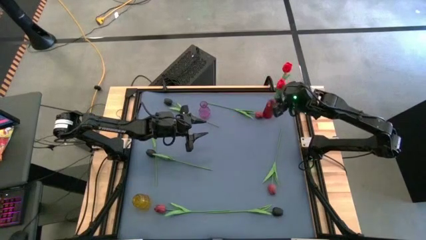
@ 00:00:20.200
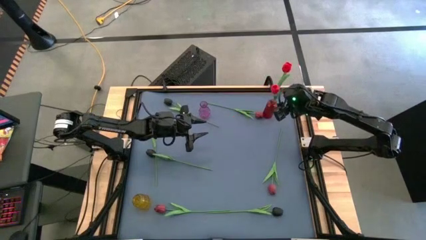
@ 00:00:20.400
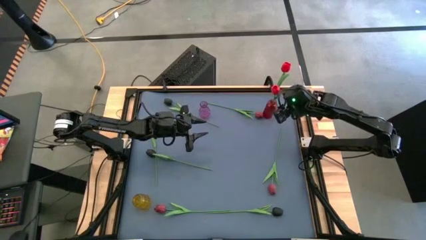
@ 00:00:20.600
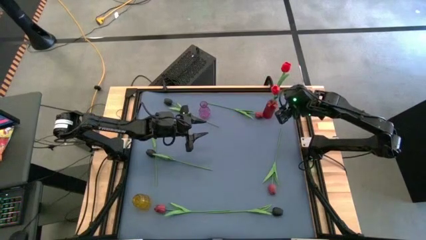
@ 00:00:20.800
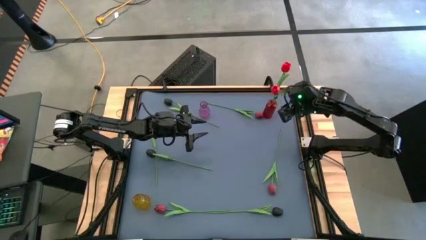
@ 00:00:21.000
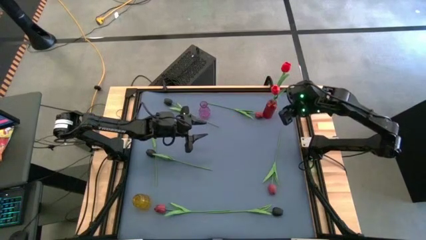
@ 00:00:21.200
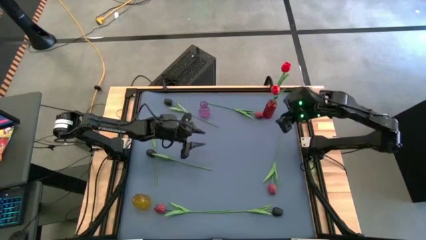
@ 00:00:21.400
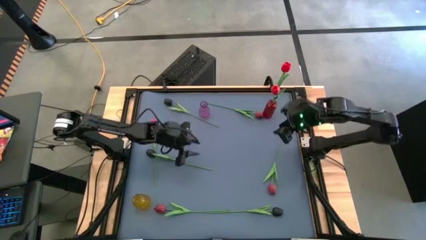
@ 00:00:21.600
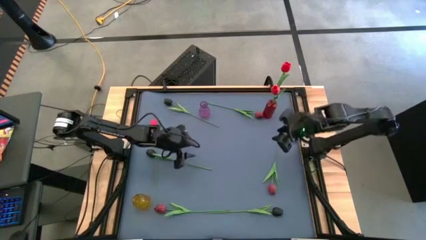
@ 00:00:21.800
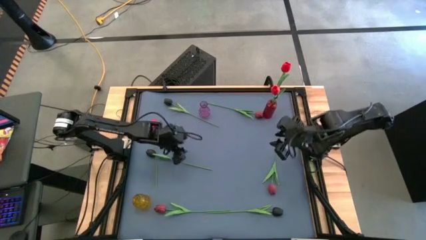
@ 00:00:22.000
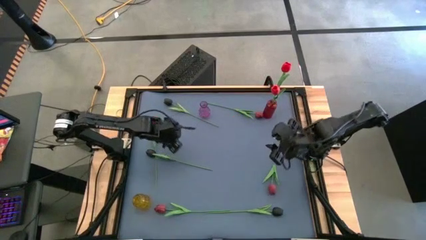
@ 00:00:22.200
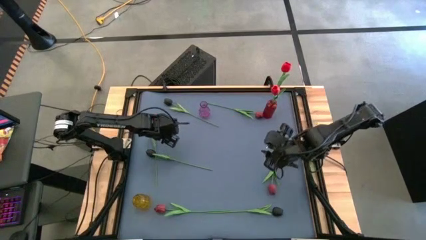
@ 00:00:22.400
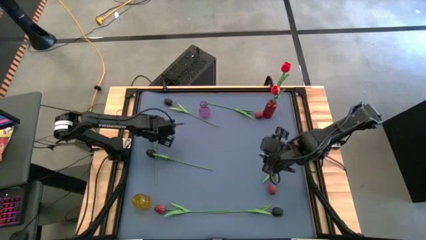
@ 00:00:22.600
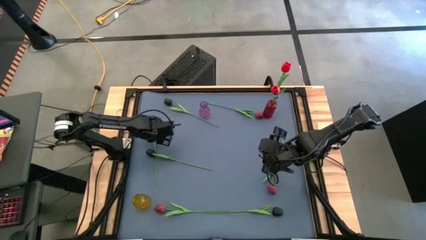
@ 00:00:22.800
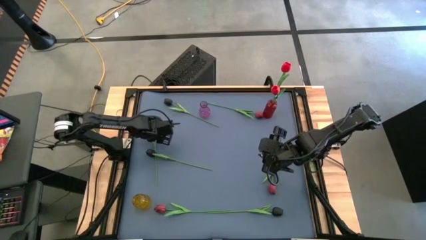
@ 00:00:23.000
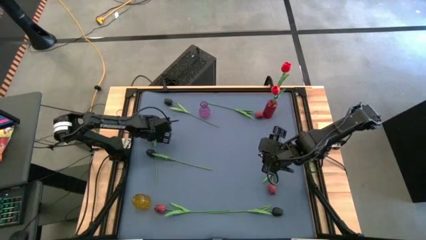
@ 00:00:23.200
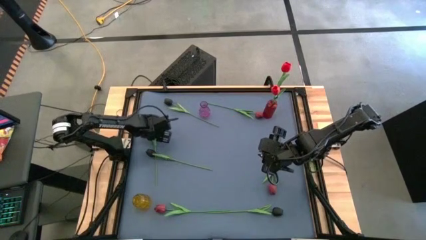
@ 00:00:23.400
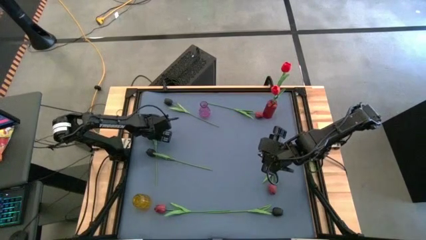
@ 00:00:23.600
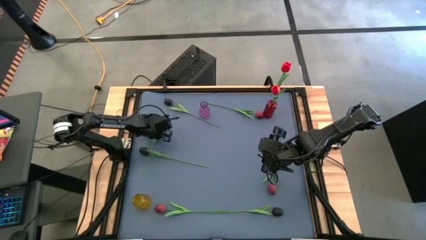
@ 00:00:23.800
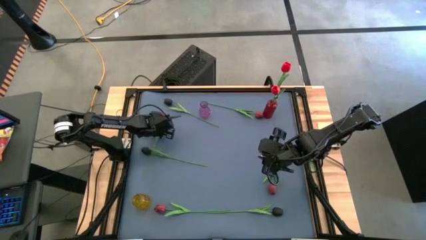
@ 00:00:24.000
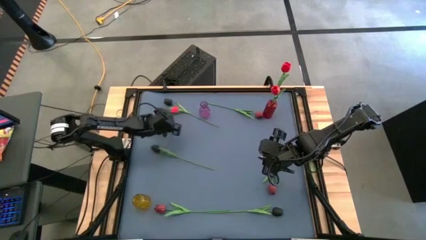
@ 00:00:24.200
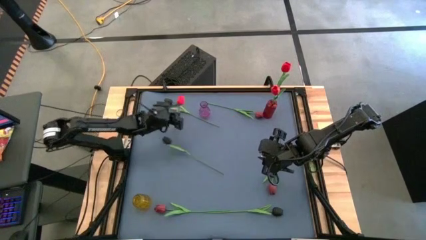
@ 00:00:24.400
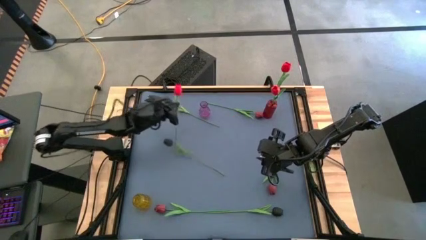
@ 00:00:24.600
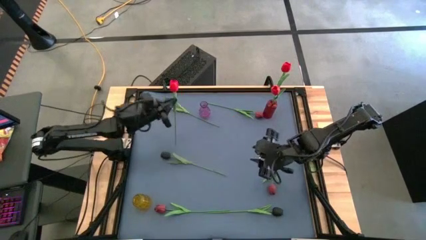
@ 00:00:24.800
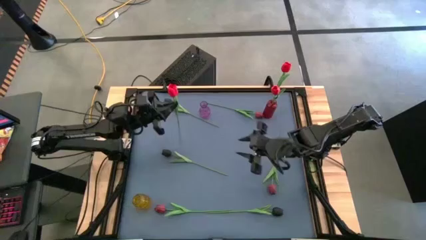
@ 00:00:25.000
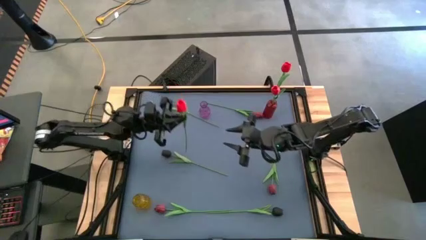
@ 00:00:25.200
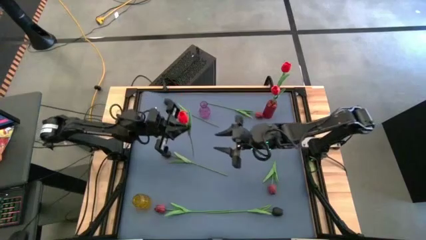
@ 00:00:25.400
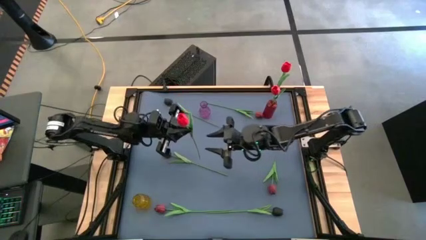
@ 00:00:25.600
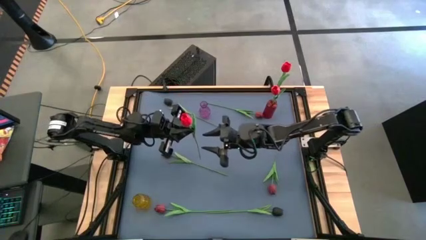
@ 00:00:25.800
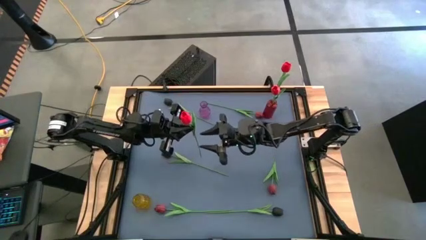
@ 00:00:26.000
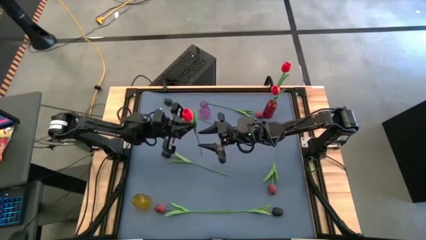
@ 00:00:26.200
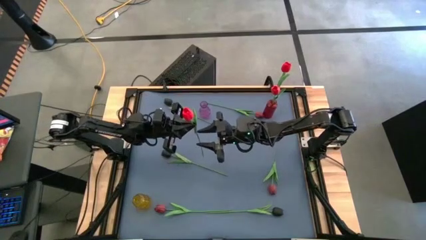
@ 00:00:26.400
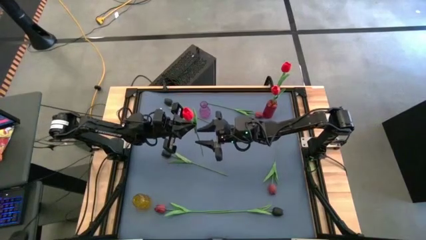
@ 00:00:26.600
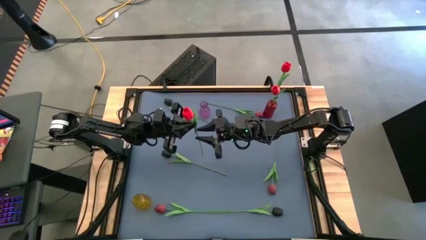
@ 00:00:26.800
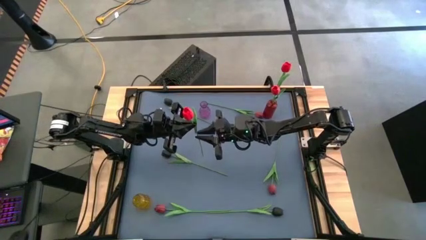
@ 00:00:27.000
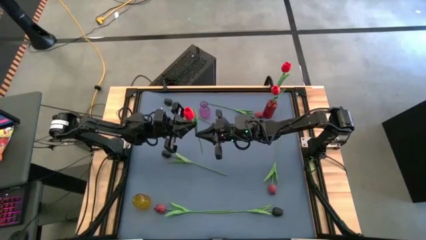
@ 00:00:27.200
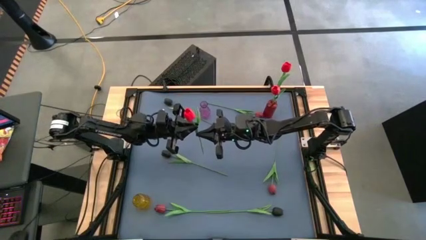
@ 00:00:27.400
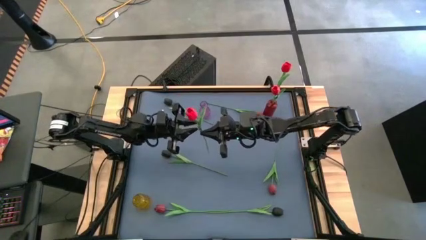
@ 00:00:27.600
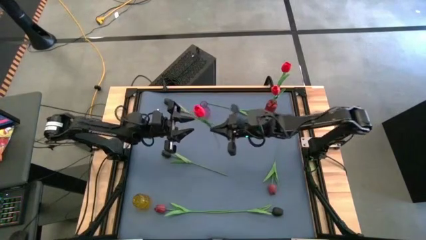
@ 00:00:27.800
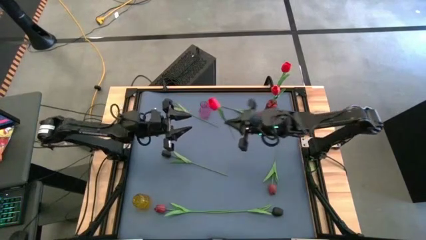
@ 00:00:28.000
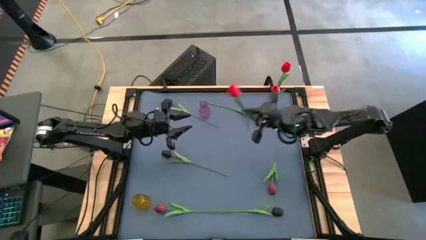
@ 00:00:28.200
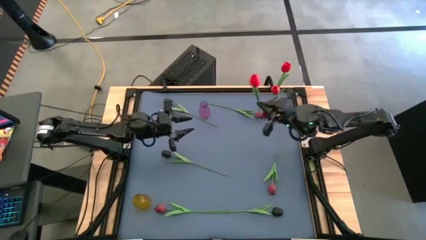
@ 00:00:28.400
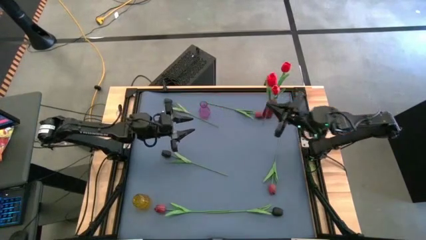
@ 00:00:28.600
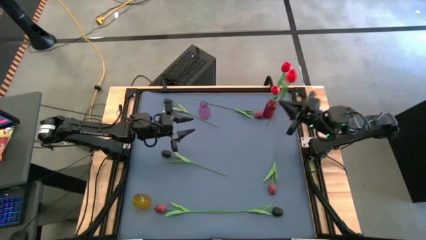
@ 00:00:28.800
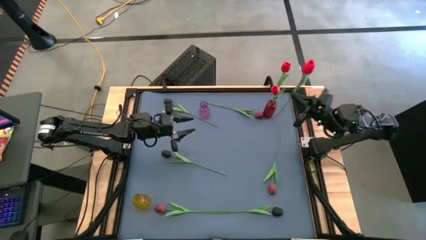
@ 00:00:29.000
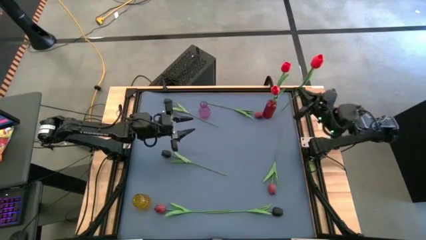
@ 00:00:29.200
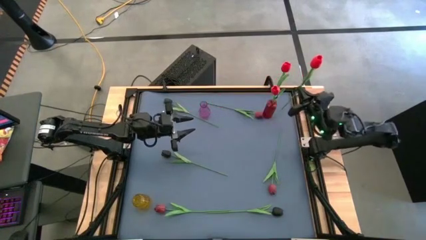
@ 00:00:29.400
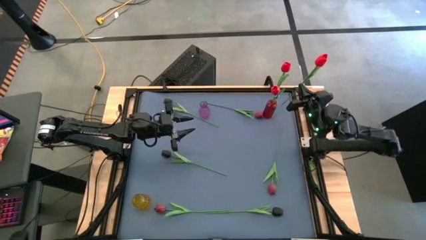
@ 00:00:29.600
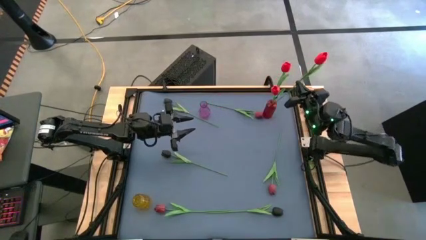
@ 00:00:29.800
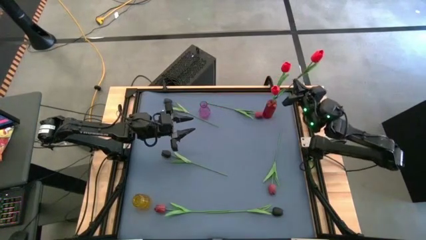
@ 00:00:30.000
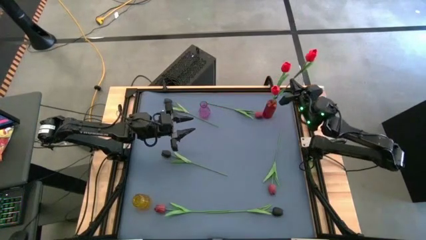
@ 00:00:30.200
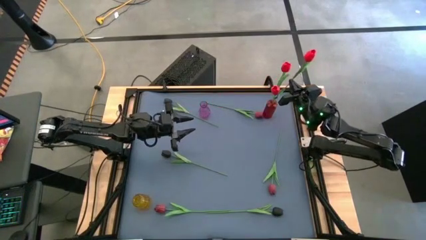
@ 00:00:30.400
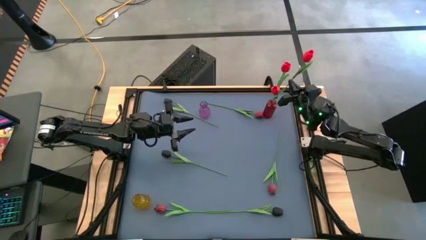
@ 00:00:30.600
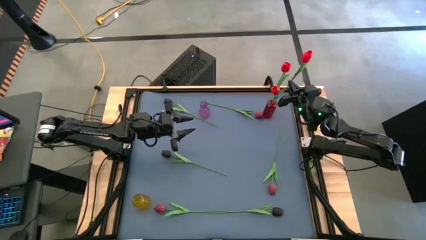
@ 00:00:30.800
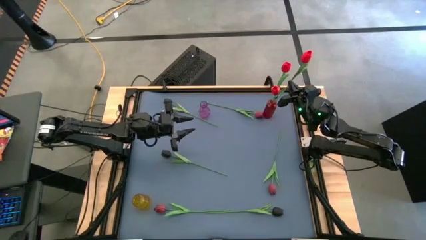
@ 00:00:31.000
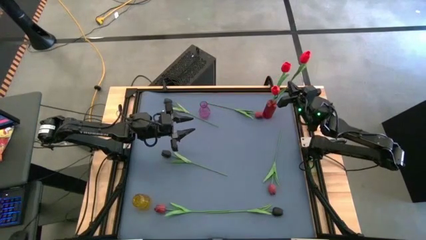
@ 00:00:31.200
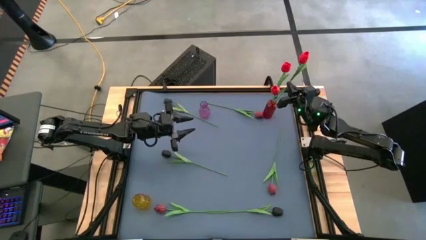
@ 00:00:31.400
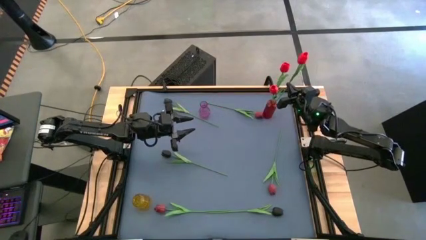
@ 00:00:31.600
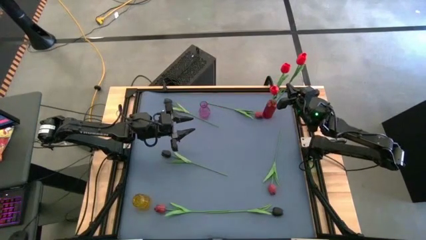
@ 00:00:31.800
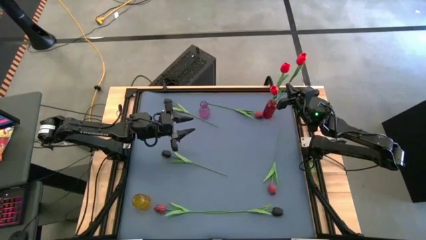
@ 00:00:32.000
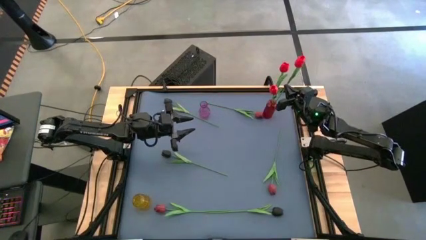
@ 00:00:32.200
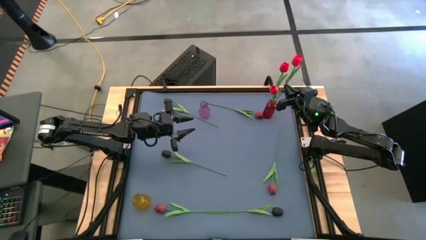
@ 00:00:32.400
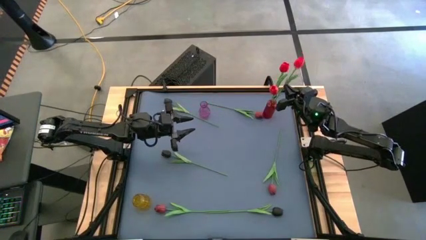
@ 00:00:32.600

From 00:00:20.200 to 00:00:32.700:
Task: Sort flowers into vase by color
Put the red flower into the red vase
